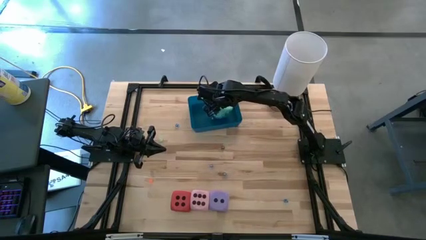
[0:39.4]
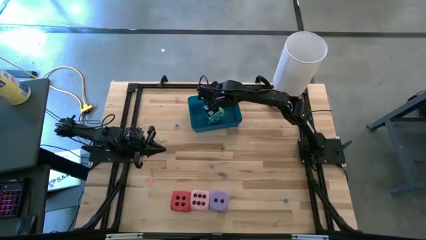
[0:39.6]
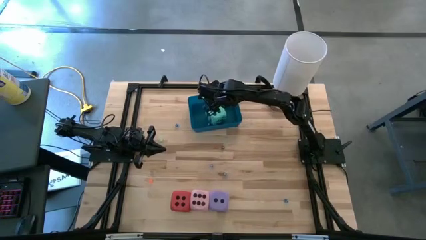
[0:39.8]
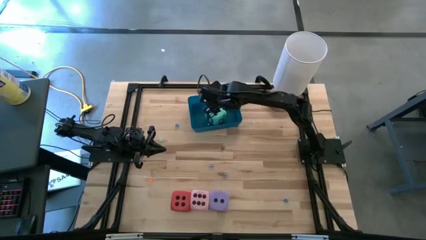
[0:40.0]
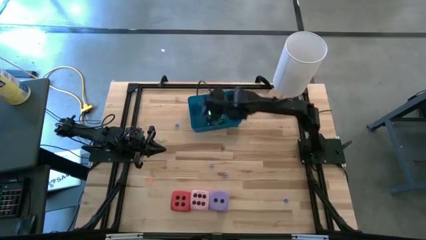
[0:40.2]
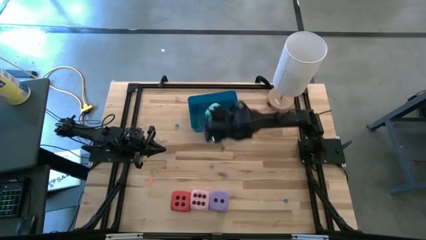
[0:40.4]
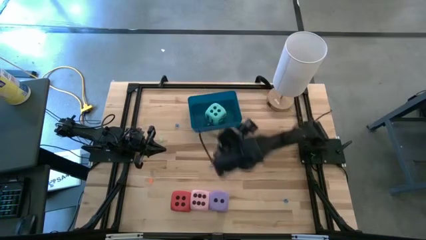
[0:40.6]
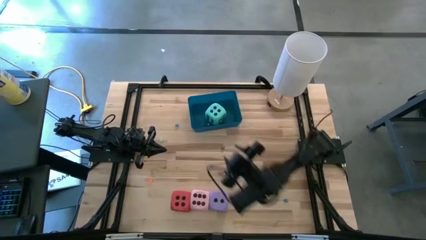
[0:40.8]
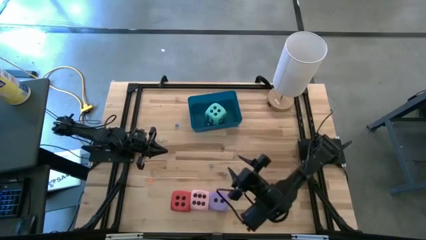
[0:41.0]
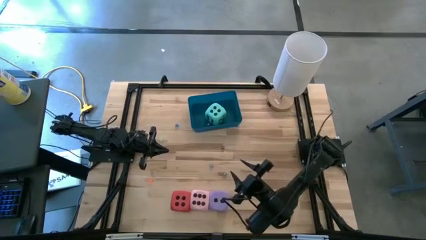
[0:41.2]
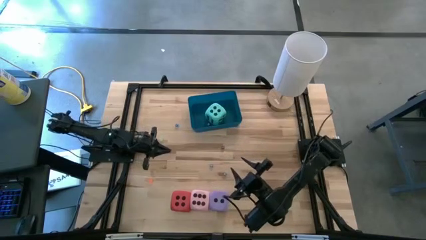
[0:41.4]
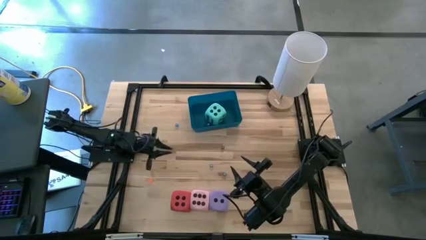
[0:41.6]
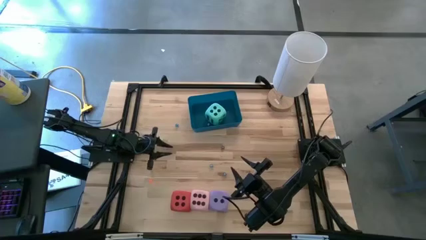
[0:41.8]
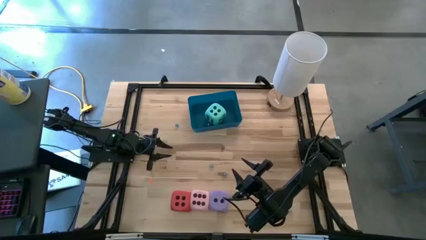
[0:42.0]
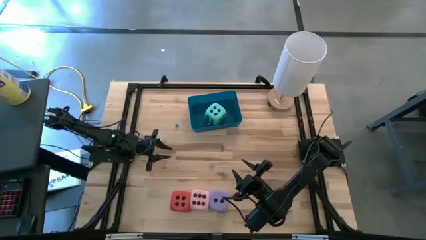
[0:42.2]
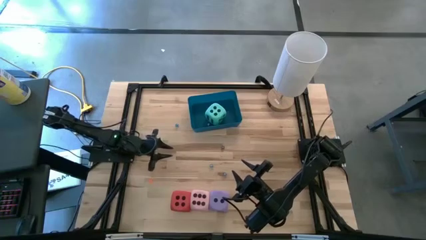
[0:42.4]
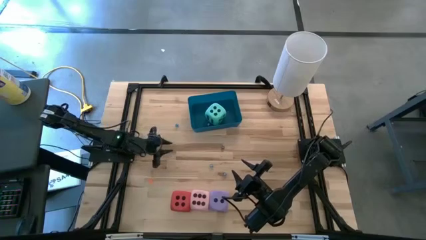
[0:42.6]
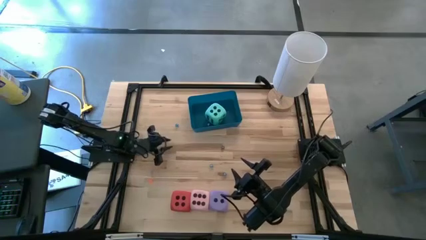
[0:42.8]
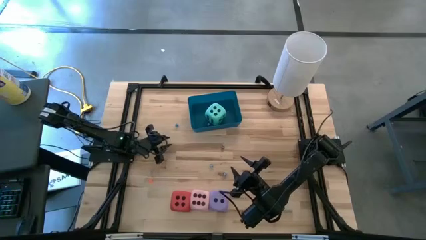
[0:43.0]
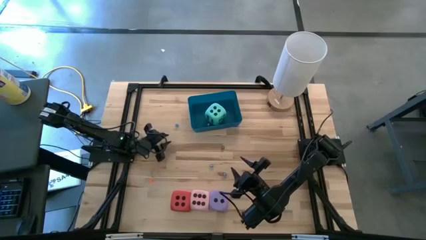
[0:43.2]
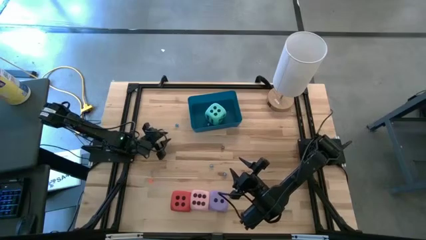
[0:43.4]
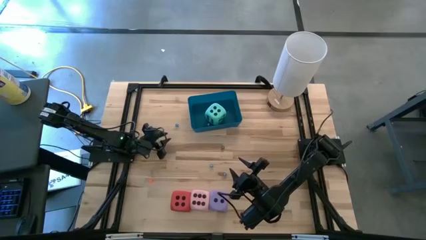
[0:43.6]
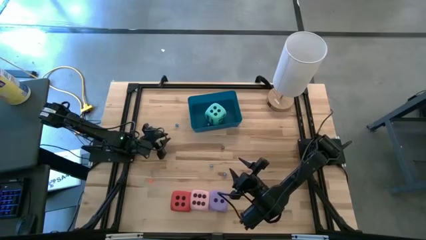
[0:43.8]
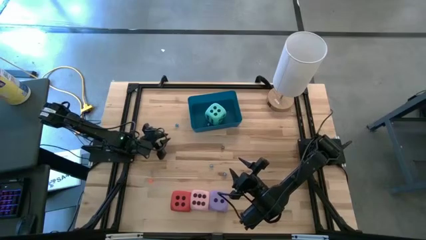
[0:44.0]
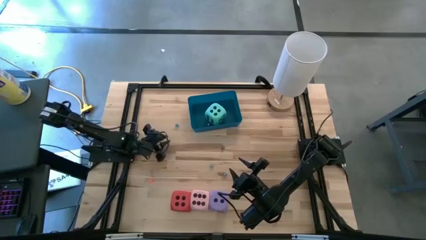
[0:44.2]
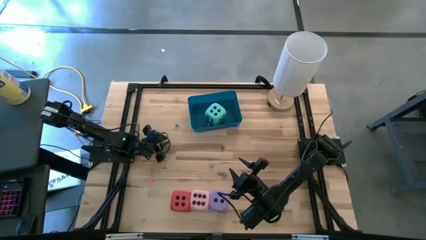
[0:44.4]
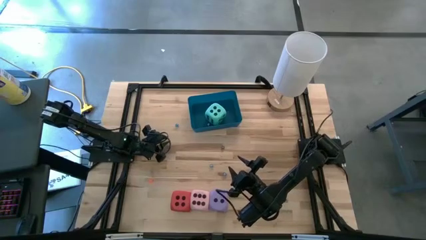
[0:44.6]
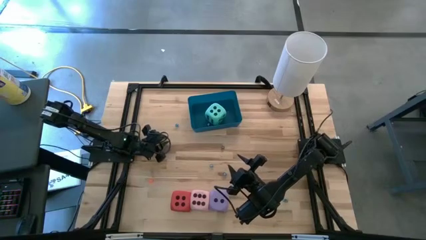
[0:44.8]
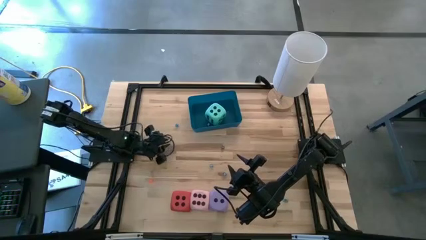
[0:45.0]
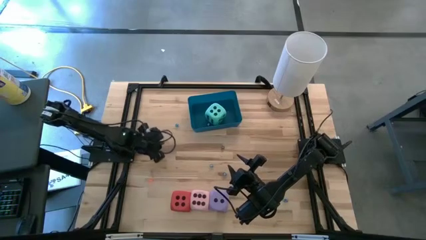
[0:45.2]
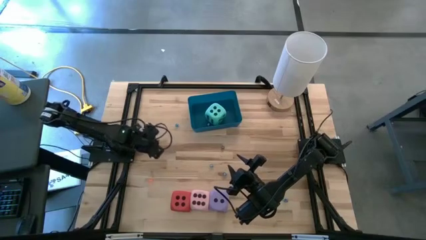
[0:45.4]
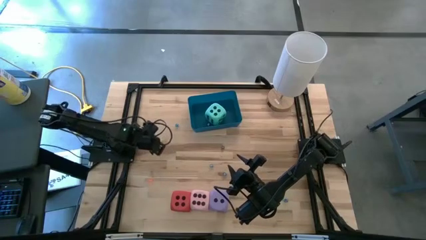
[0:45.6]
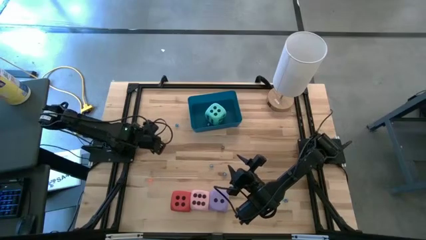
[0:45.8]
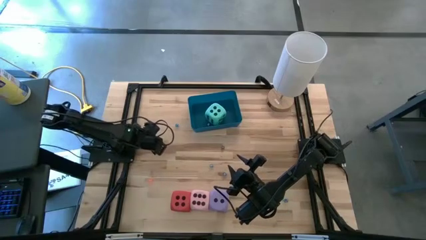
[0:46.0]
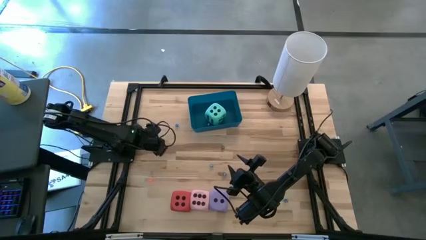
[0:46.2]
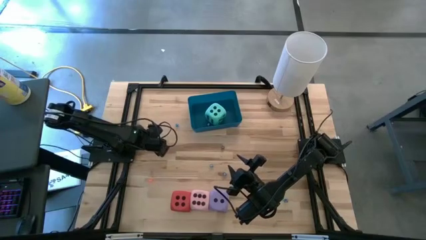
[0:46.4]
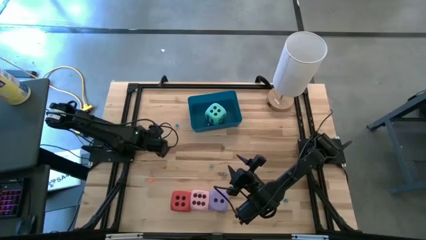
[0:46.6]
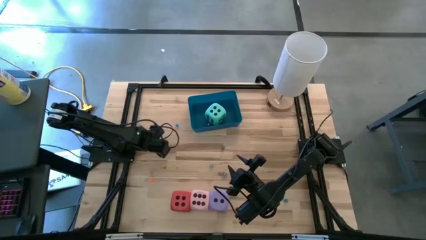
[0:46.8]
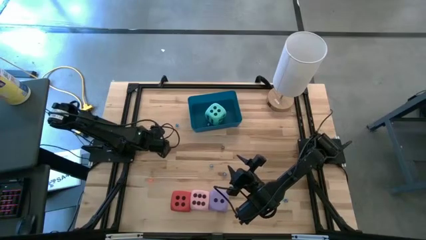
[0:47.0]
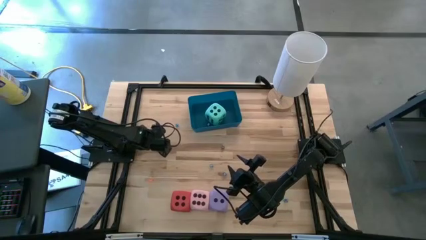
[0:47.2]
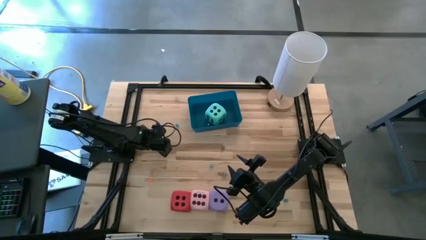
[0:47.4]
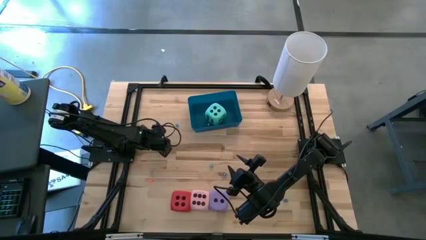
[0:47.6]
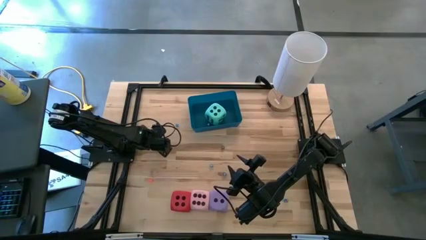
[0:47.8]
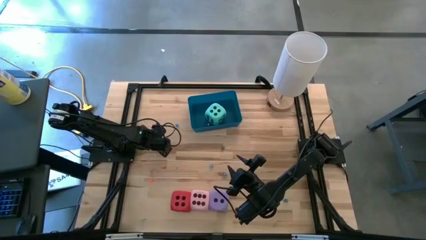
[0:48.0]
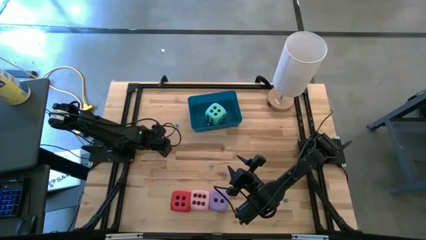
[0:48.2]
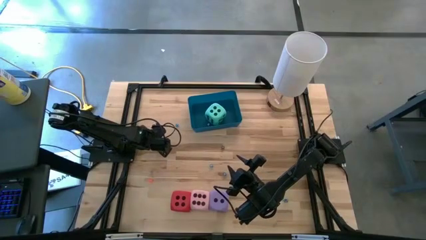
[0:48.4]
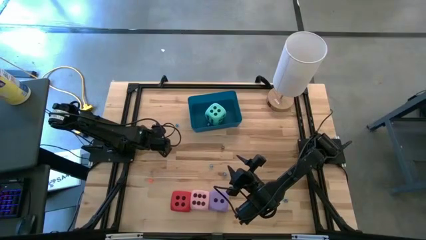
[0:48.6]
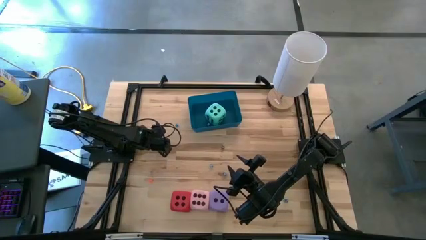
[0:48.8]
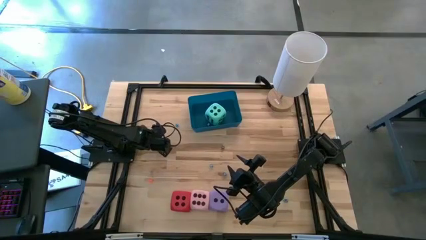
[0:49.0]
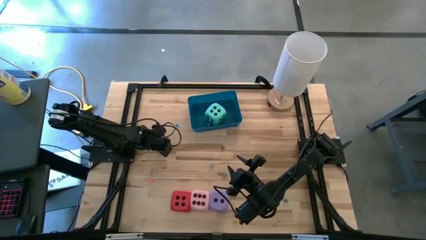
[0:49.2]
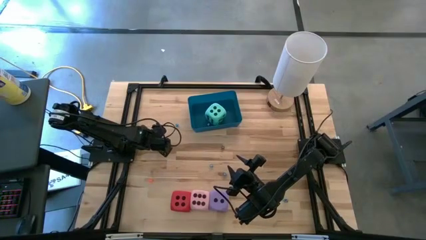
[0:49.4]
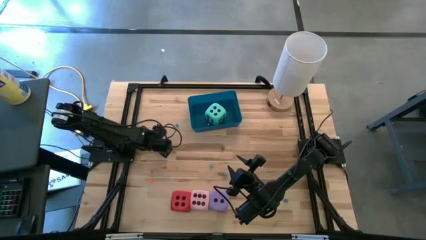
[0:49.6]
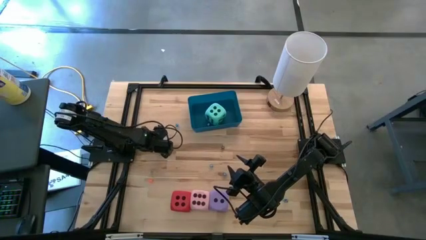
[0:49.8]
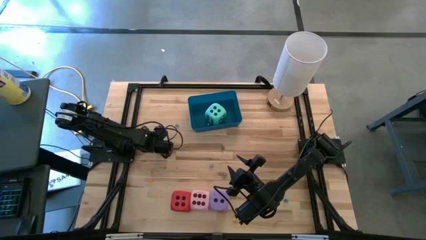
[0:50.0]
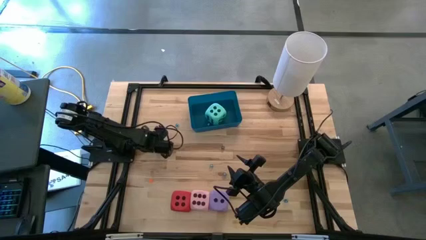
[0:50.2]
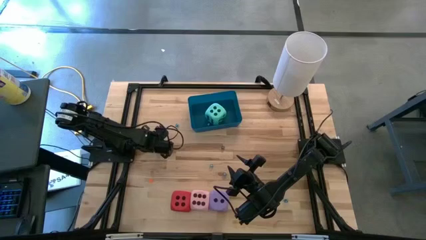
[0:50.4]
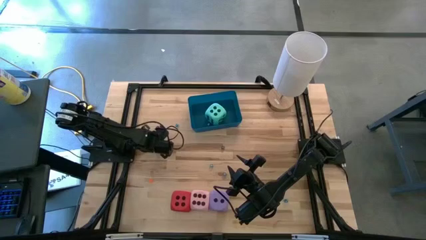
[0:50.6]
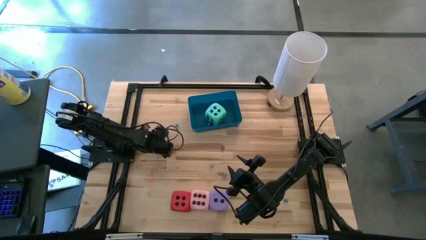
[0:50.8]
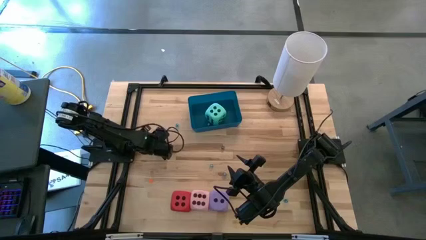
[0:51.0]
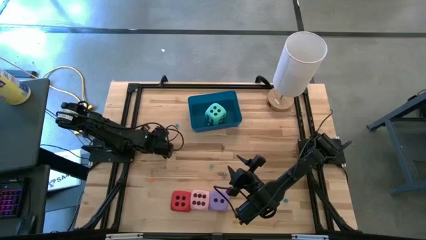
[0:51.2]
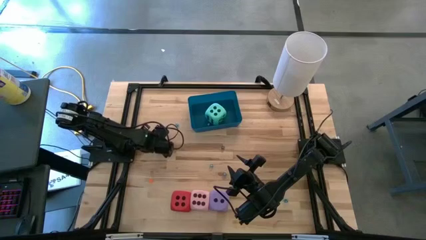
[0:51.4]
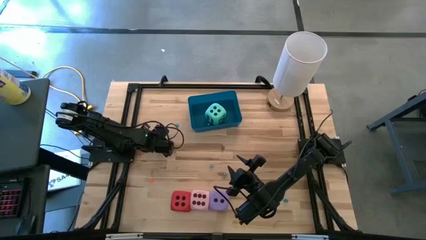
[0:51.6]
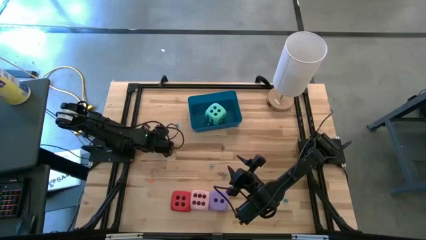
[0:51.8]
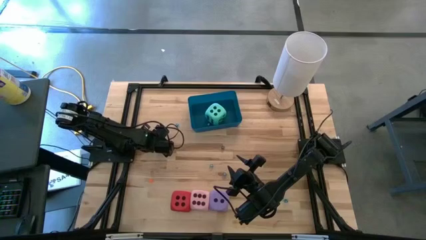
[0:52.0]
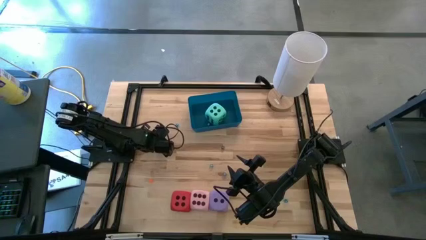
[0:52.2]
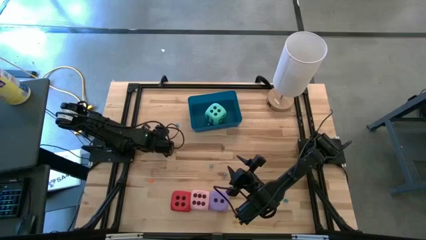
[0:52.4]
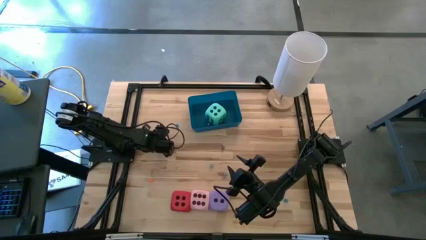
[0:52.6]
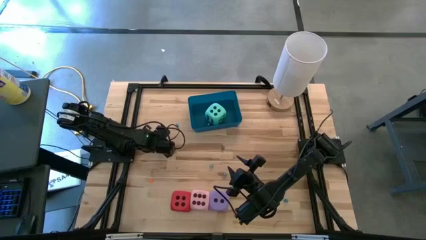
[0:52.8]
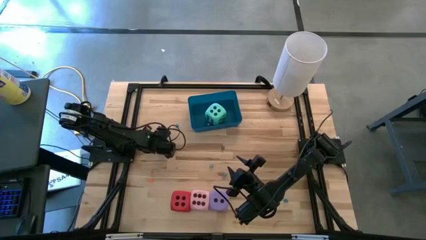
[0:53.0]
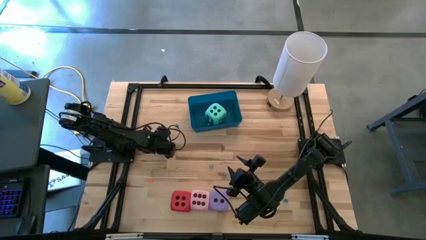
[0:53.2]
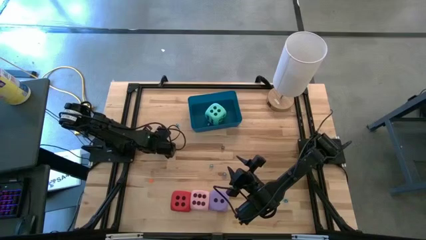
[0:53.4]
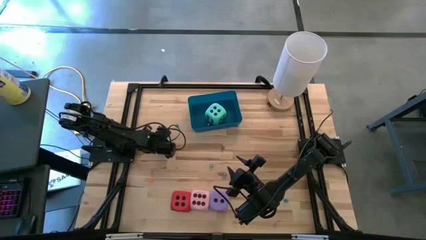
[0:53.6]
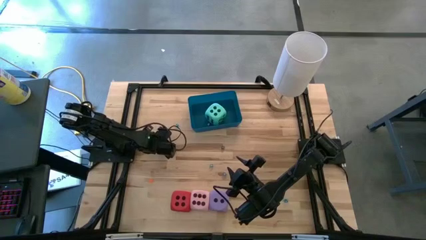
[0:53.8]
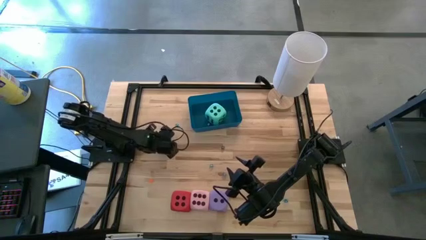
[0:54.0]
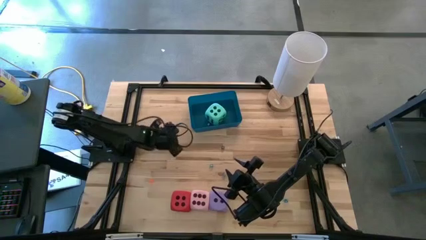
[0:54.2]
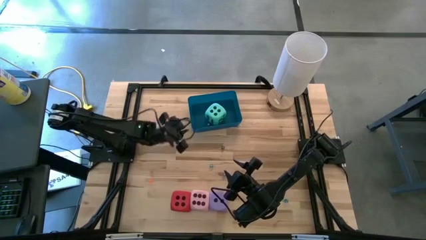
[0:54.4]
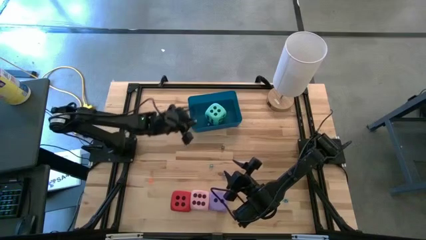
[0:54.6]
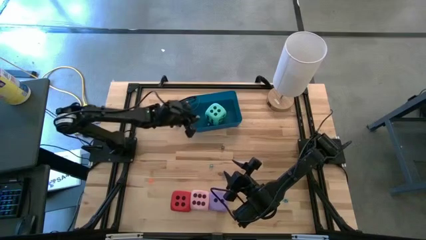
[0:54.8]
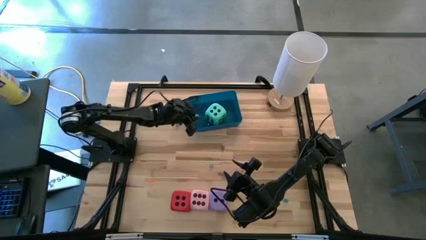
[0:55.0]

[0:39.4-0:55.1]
Task: Pick & Place Dice
Put the small green dice into the blue bin
